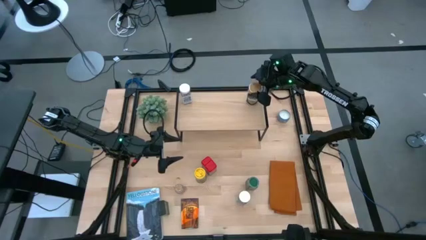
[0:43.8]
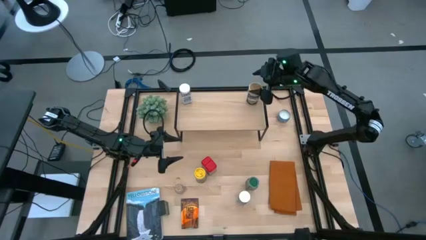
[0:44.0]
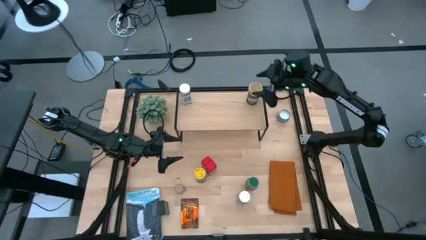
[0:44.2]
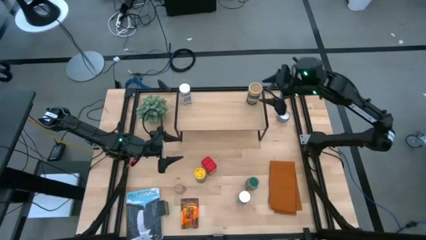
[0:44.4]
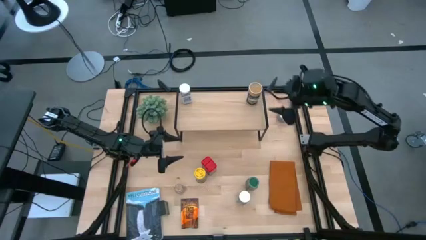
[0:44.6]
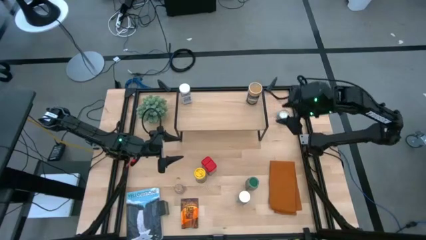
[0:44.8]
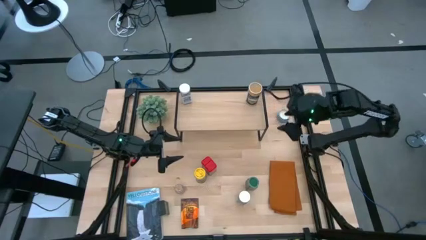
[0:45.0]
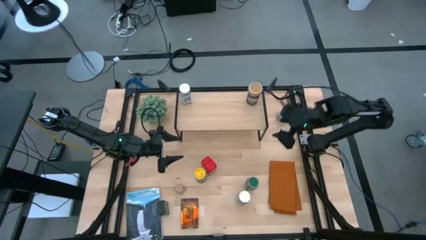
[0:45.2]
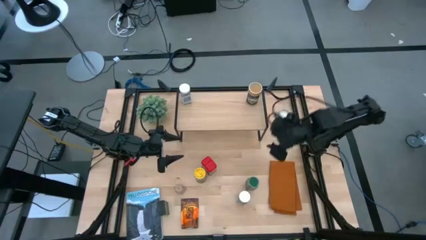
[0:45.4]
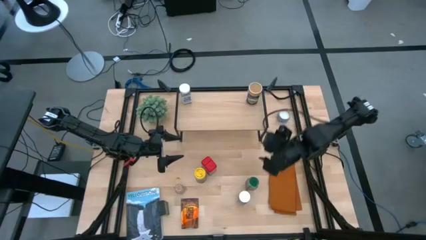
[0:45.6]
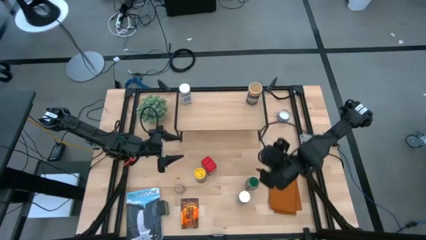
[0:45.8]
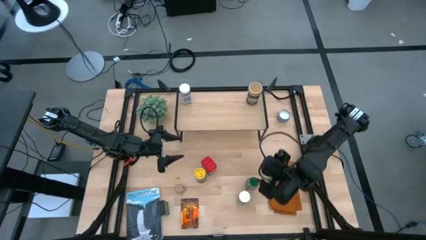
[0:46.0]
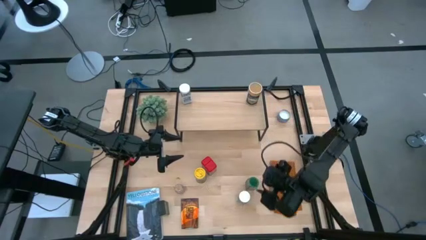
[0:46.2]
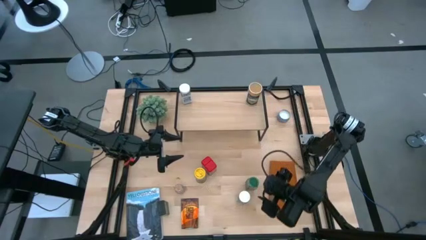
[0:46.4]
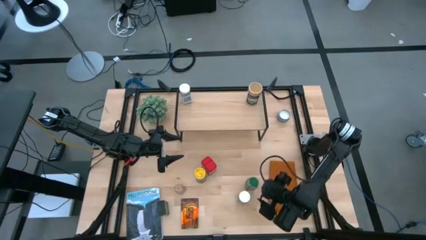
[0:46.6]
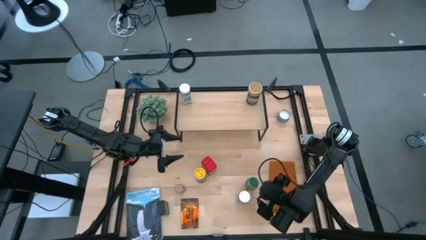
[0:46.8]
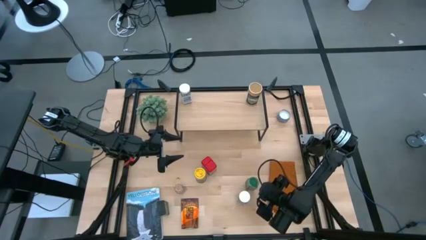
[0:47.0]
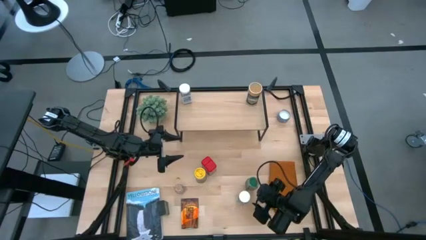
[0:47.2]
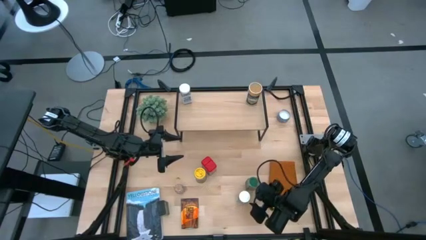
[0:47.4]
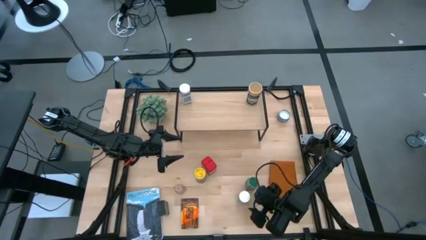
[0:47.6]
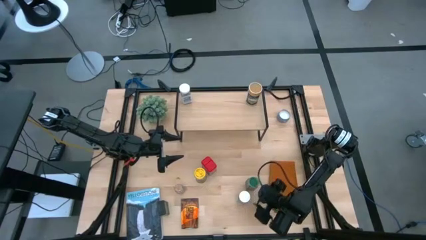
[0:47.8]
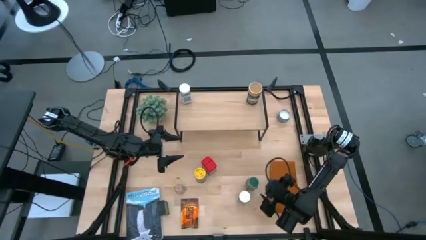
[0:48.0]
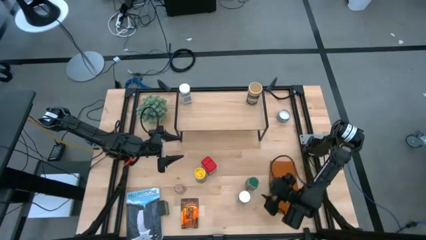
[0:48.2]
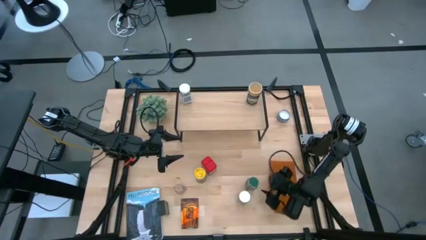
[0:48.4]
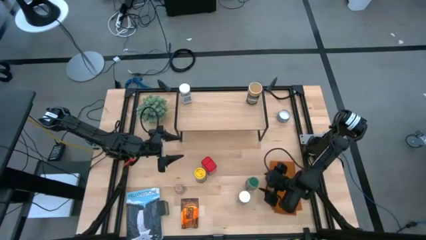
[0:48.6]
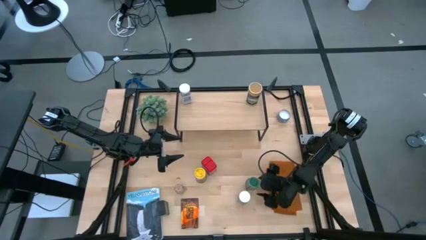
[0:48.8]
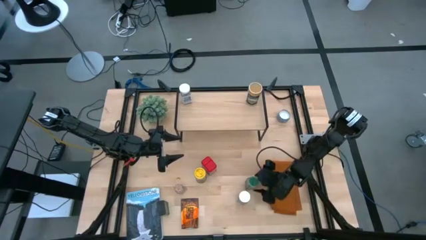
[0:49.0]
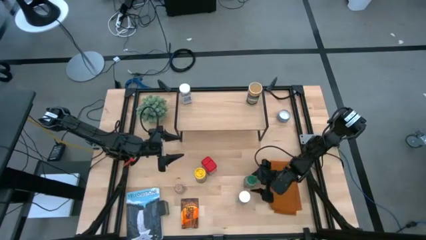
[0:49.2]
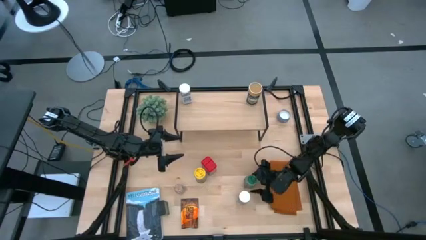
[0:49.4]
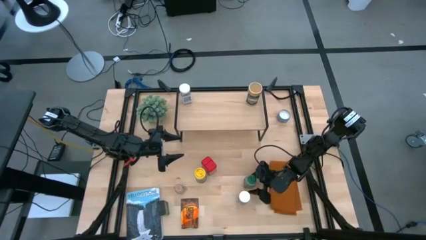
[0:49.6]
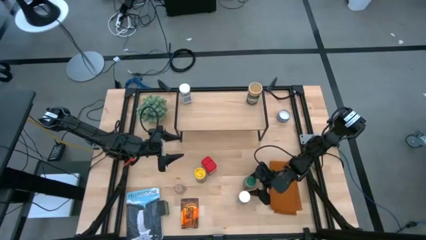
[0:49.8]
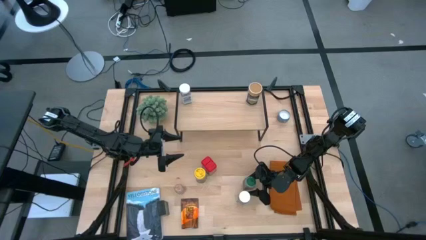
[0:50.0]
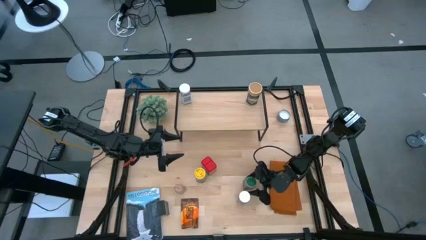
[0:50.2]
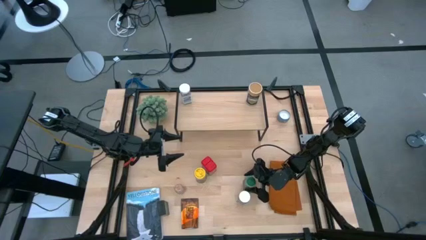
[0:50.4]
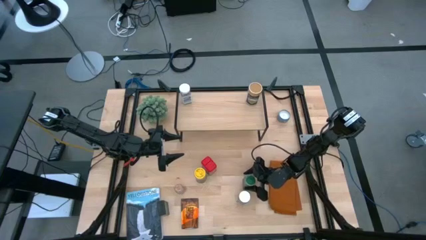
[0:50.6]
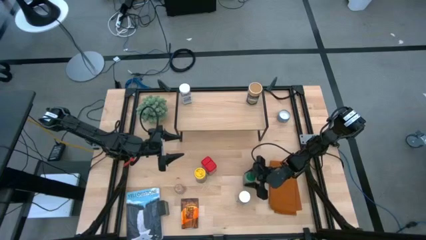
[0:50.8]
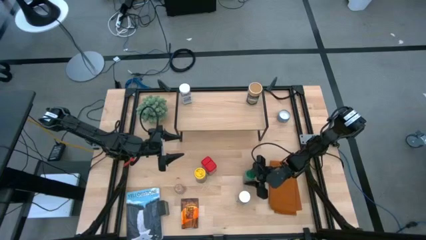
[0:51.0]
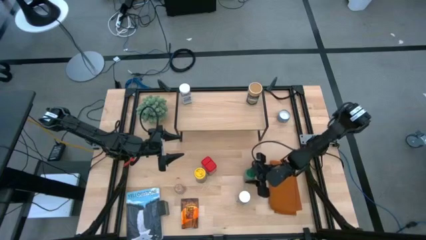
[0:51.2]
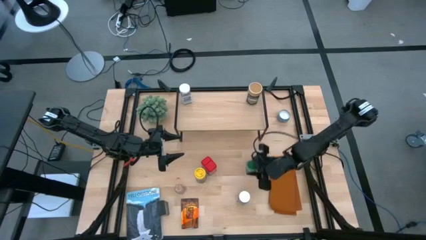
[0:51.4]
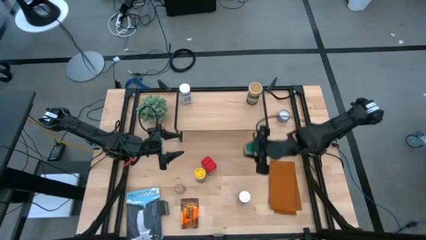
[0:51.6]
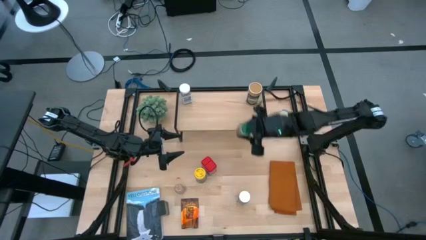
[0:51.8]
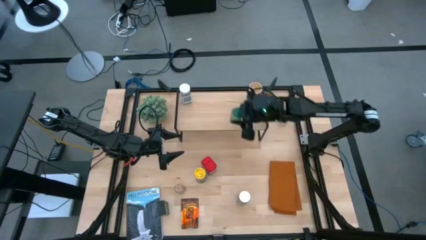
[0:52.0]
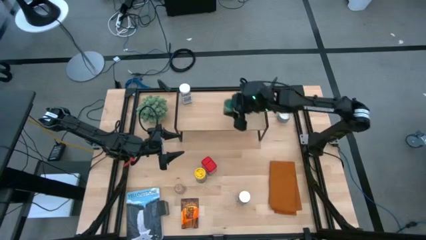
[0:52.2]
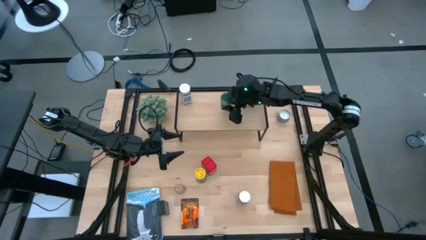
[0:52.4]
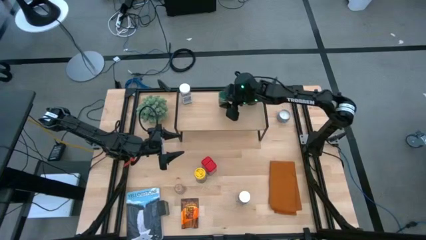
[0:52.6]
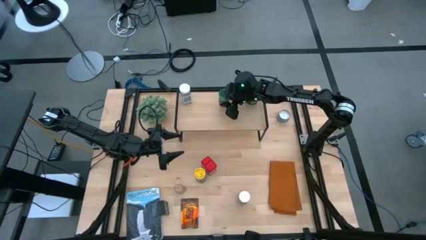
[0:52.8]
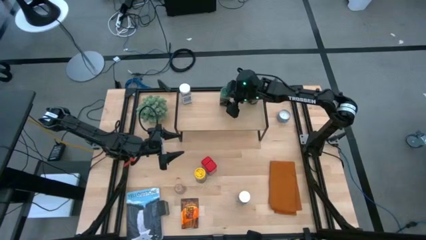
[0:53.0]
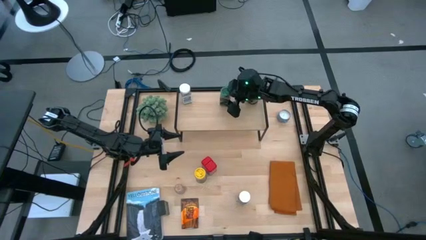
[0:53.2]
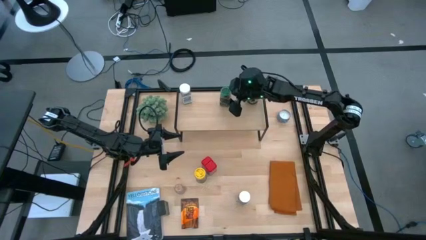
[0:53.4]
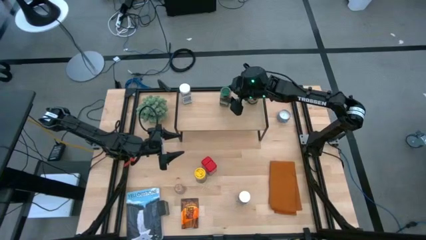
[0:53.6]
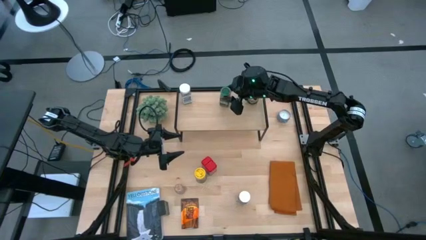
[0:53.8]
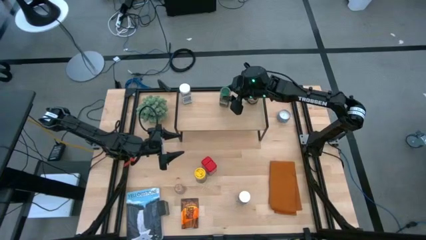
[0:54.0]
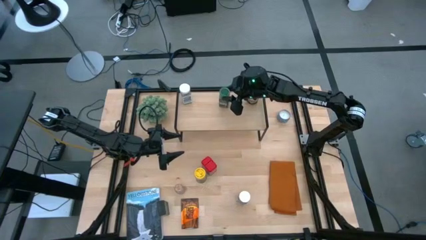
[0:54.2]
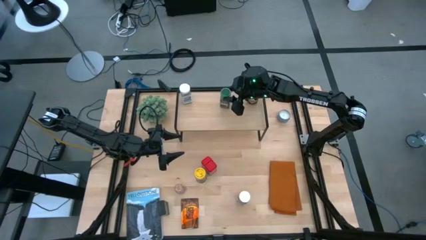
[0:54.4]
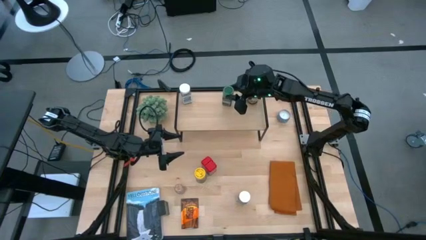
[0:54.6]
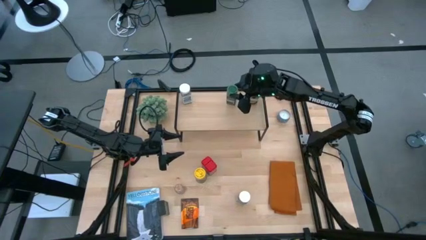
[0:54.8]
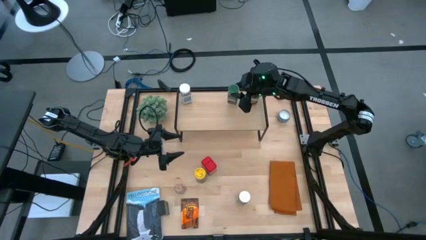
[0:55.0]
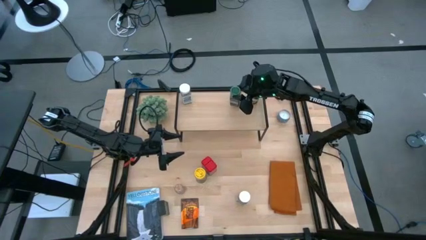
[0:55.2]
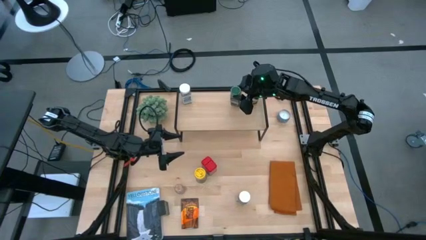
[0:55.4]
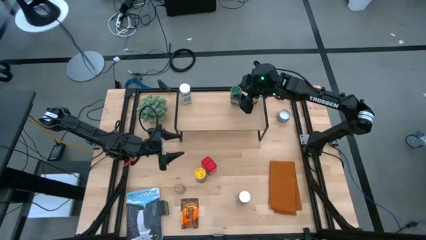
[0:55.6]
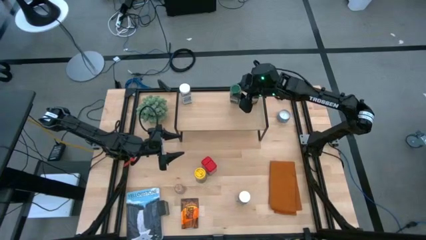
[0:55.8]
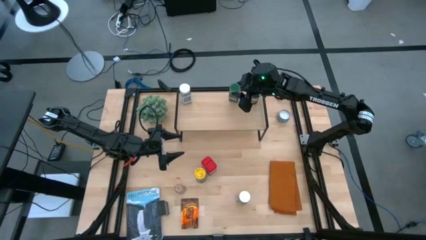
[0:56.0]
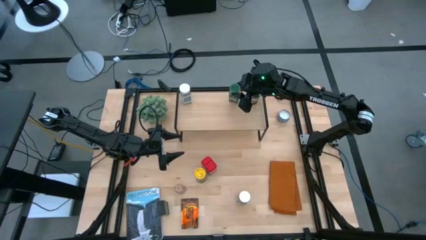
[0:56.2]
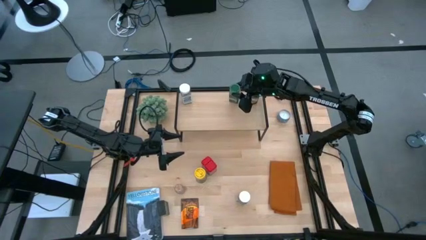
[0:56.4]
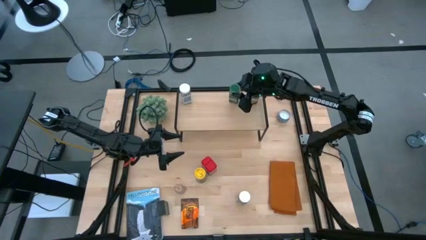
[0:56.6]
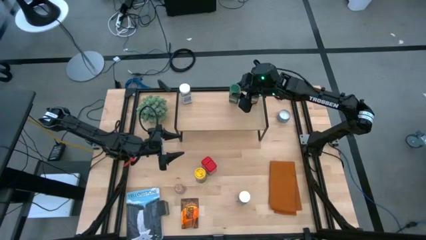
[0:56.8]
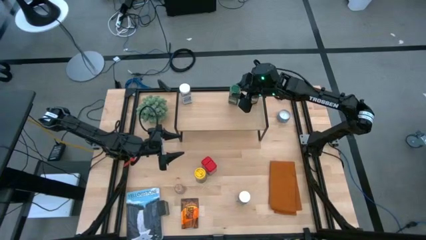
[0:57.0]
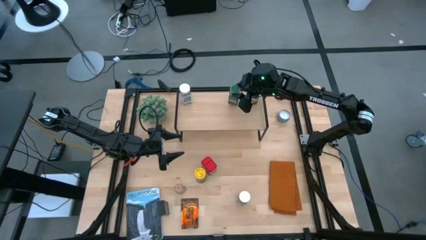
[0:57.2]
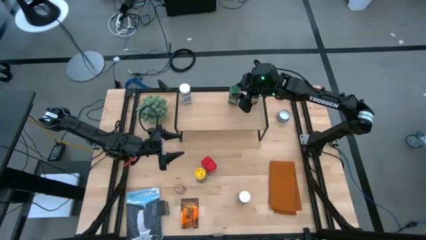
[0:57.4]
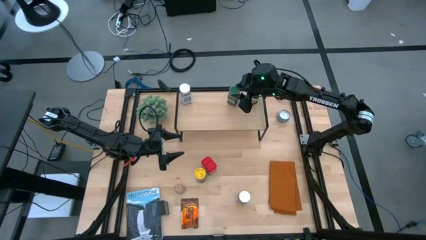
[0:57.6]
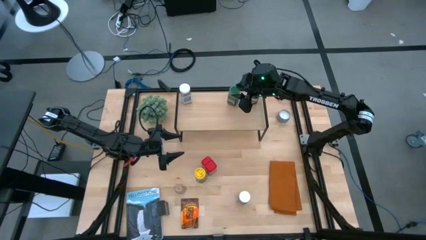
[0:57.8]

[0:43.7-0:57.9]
Task: Shelf spices
Put the green seasoning onto the shelf

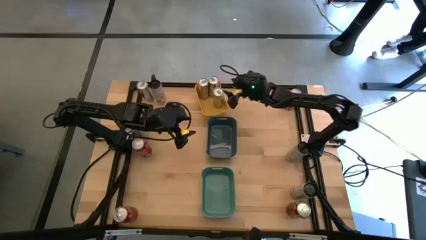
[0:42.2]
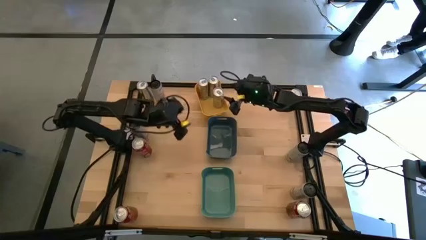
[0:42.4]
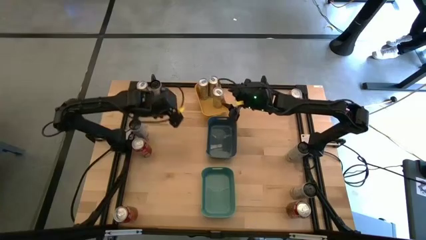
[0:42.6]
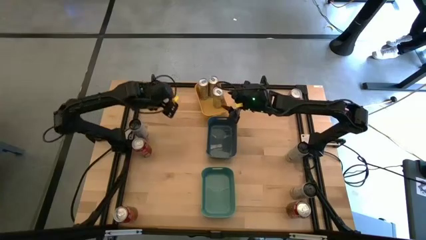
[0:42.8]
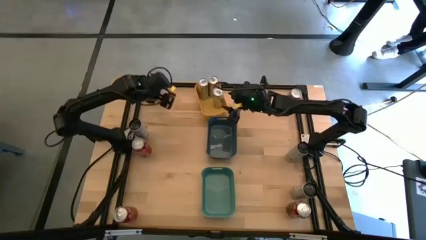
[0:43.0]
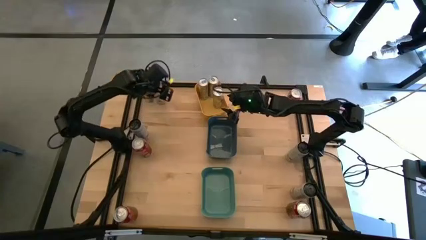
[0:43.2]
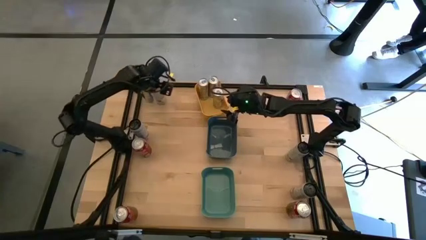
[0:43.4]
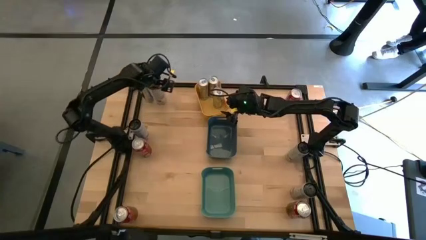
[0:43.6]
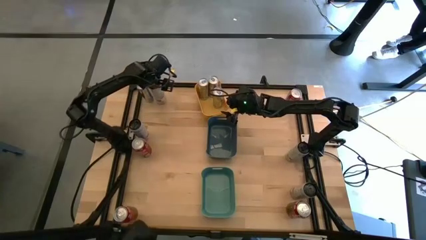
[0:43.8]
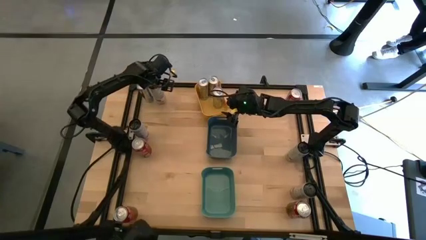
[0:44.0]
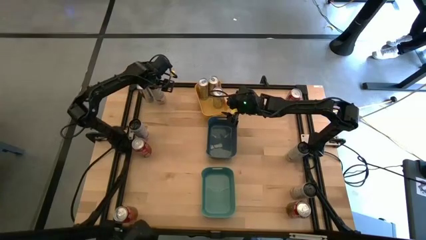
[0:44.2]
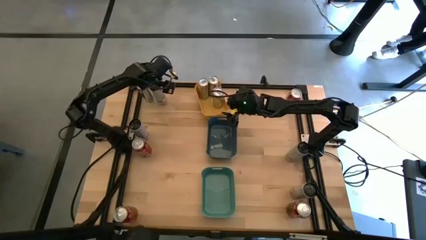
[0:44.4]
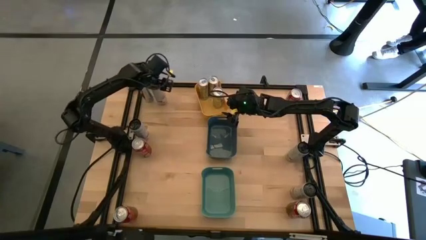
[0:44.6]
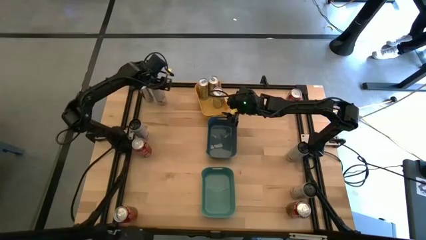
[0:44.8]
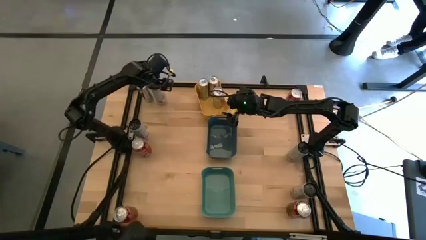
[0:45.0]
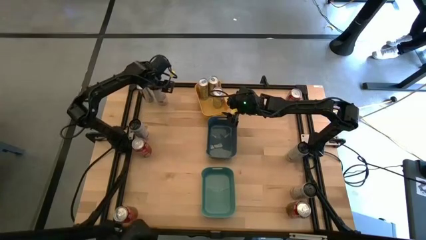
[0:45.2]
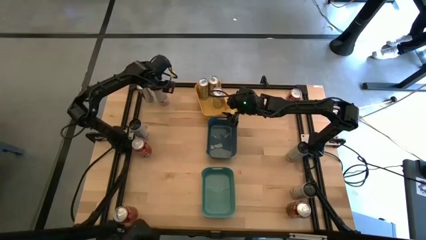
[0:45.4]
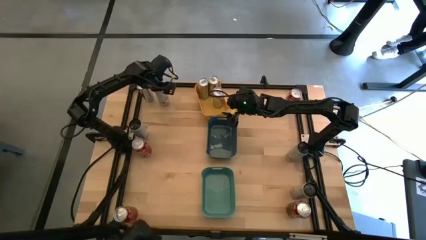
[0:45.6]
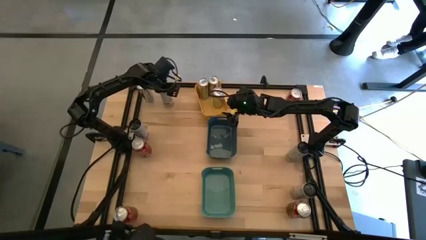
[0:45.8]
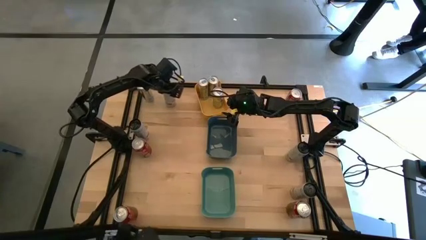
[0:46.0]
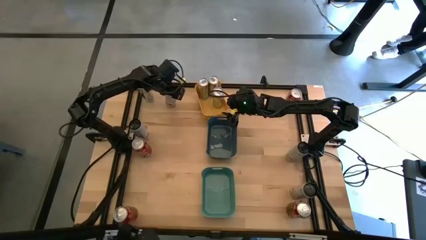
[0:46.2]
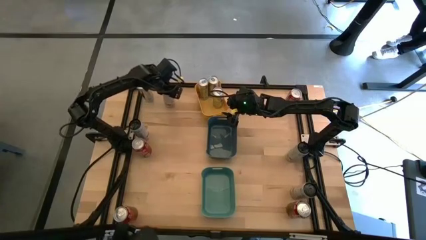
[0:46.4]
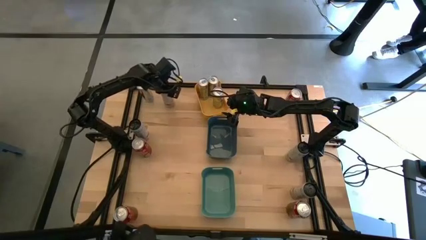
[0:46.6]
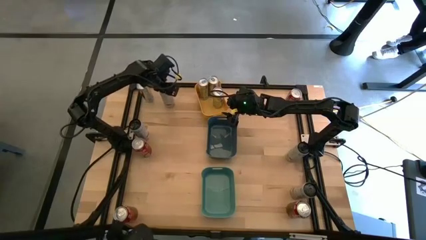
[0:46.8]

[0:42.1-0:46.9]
Task: Sort soda cans
Move the black soda can to the right
